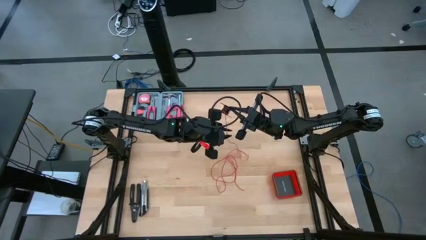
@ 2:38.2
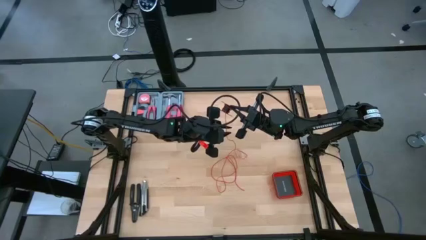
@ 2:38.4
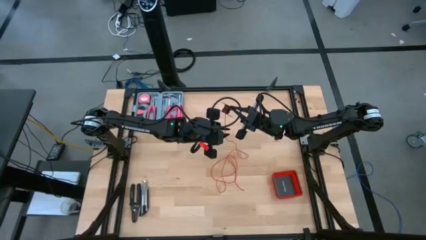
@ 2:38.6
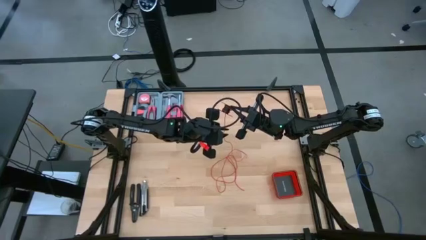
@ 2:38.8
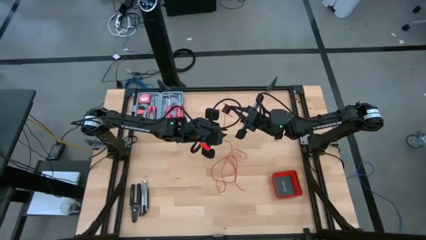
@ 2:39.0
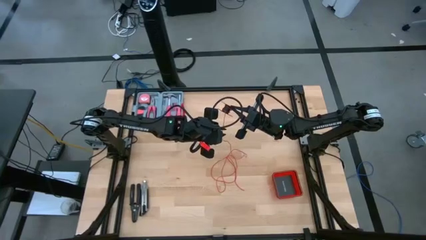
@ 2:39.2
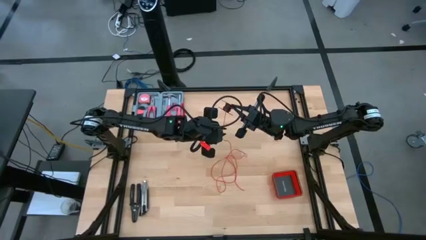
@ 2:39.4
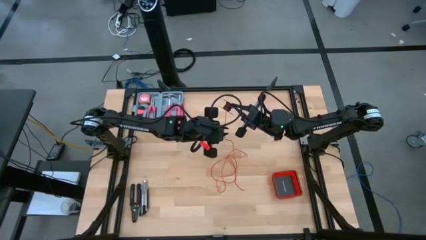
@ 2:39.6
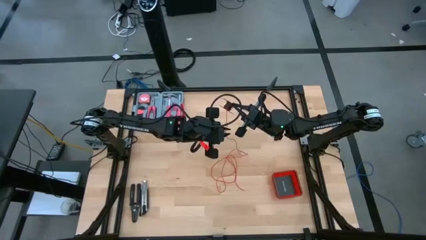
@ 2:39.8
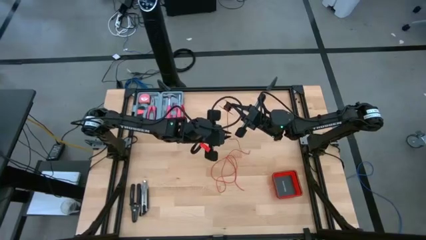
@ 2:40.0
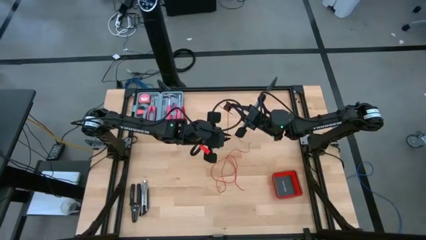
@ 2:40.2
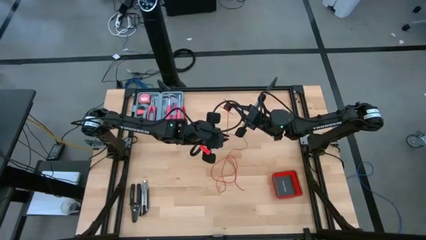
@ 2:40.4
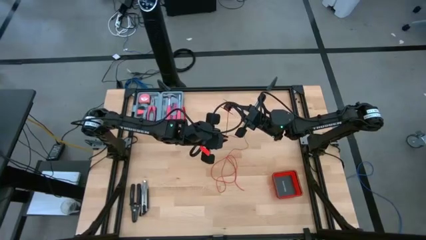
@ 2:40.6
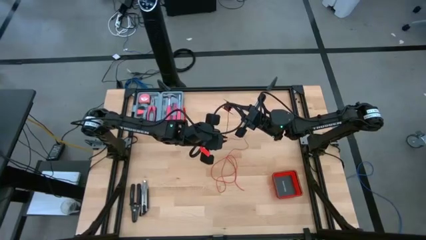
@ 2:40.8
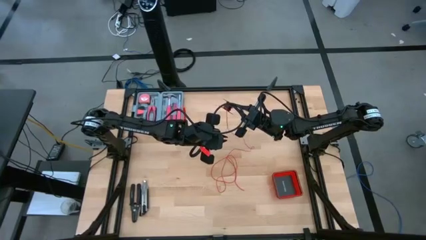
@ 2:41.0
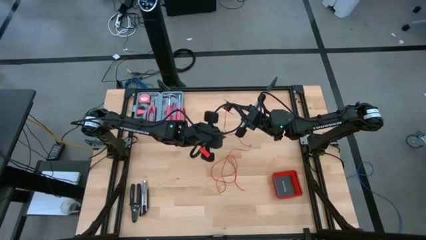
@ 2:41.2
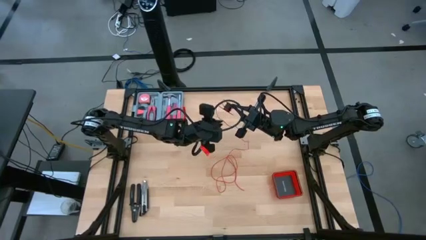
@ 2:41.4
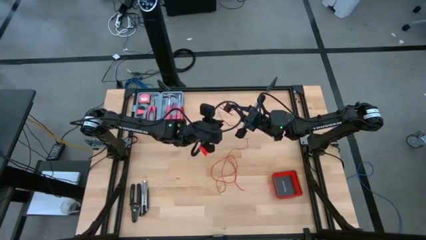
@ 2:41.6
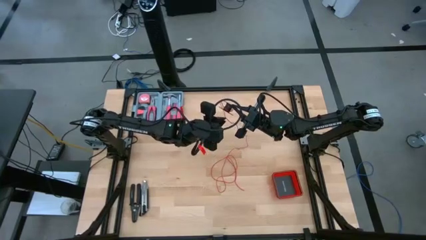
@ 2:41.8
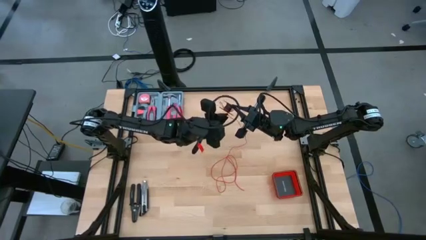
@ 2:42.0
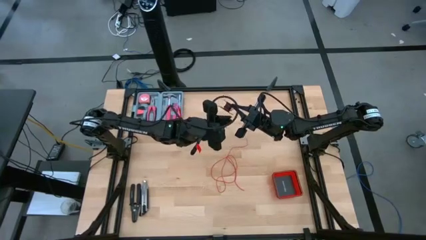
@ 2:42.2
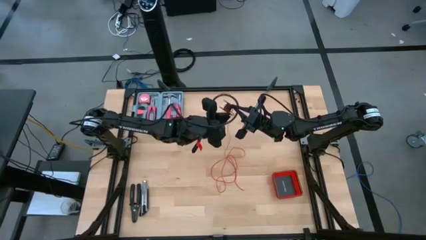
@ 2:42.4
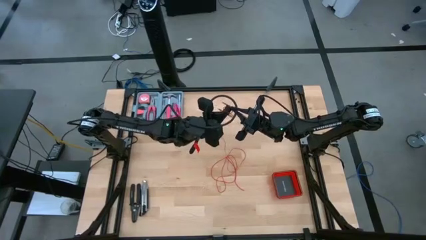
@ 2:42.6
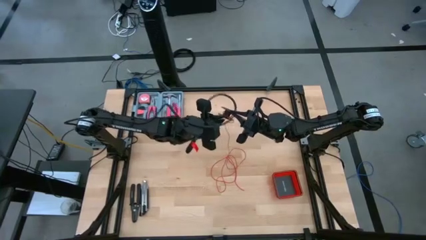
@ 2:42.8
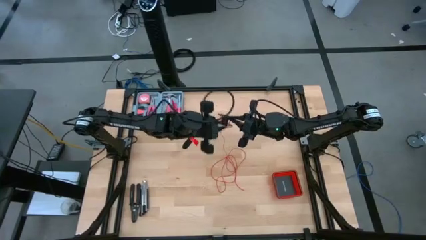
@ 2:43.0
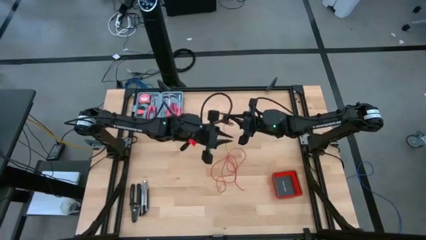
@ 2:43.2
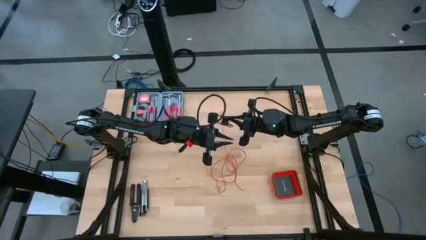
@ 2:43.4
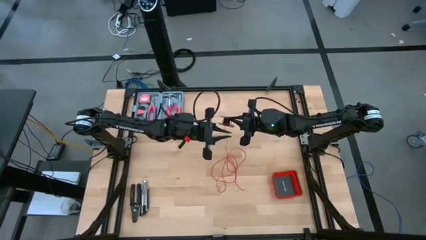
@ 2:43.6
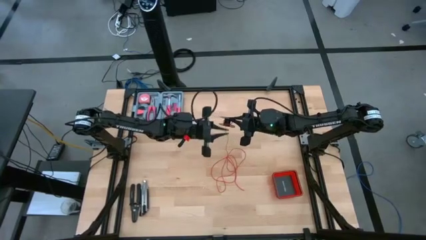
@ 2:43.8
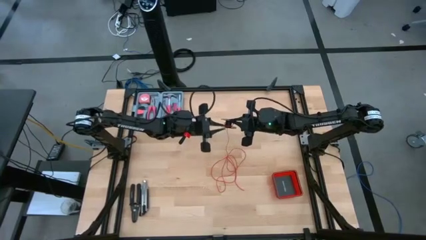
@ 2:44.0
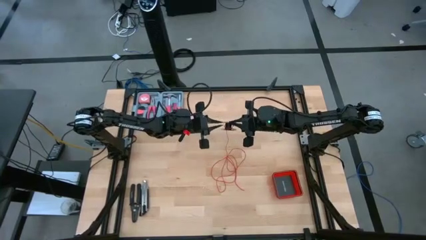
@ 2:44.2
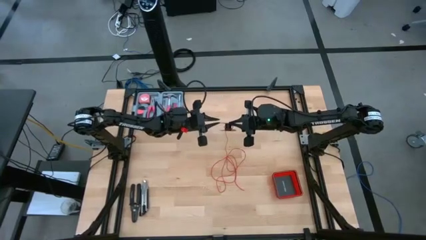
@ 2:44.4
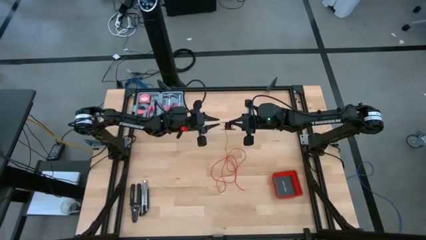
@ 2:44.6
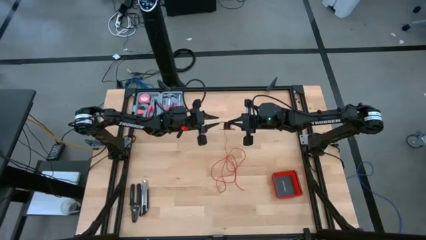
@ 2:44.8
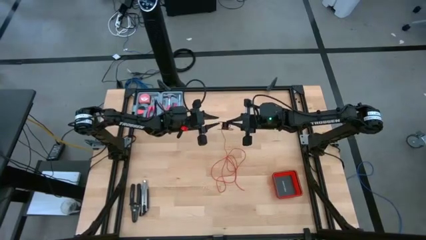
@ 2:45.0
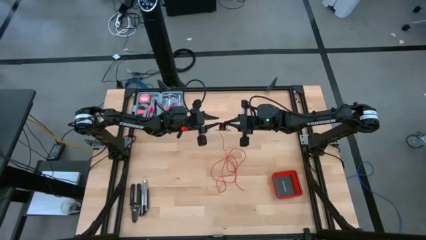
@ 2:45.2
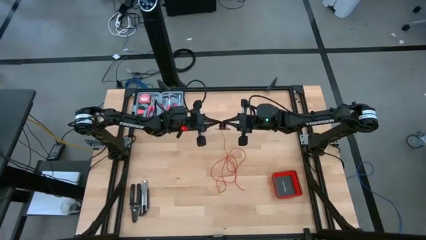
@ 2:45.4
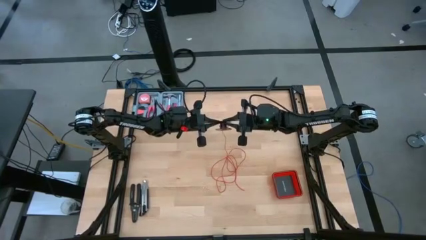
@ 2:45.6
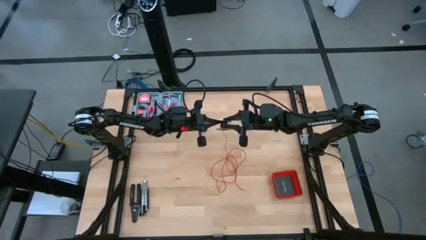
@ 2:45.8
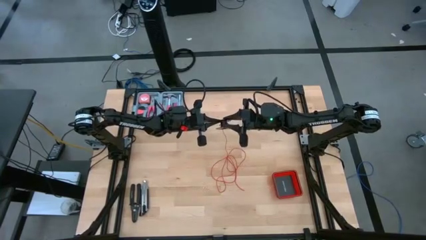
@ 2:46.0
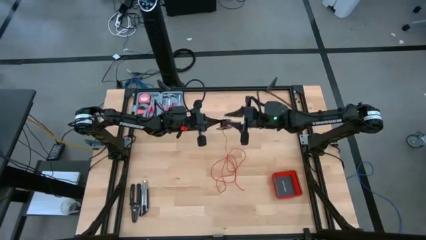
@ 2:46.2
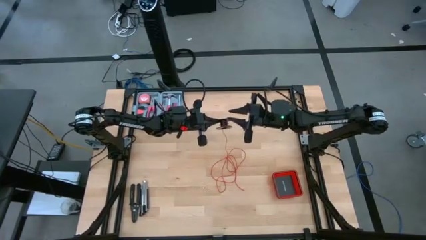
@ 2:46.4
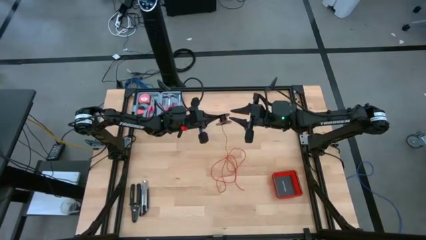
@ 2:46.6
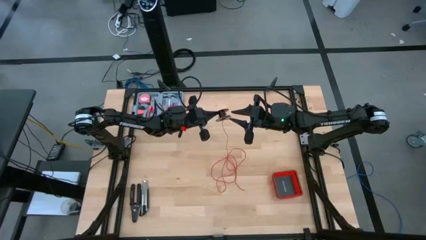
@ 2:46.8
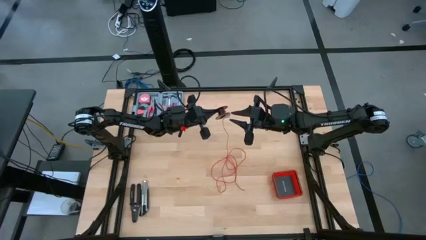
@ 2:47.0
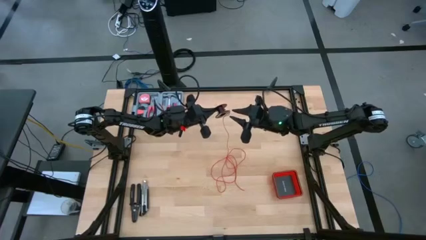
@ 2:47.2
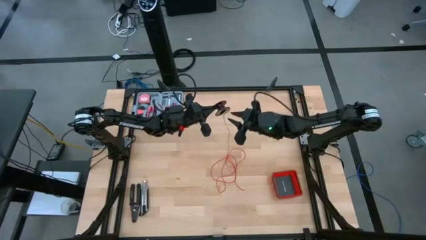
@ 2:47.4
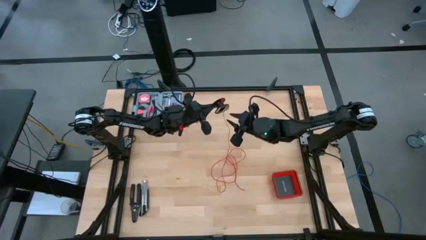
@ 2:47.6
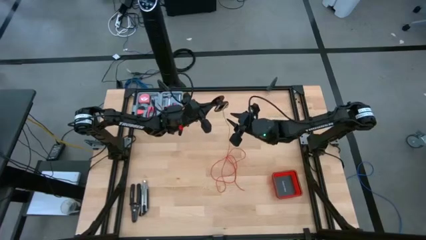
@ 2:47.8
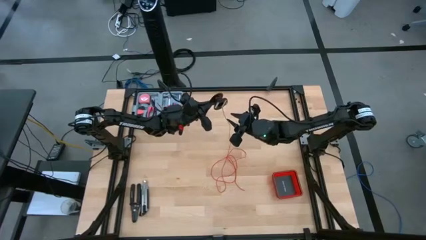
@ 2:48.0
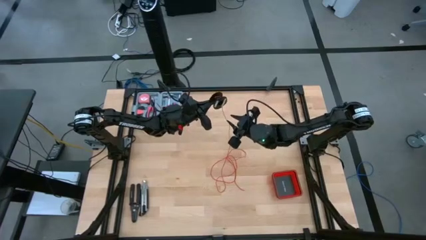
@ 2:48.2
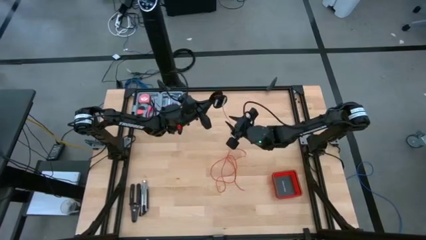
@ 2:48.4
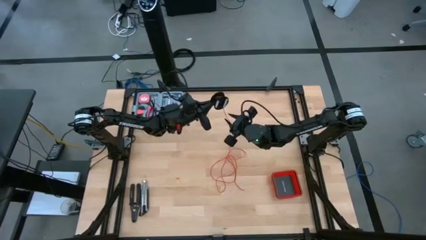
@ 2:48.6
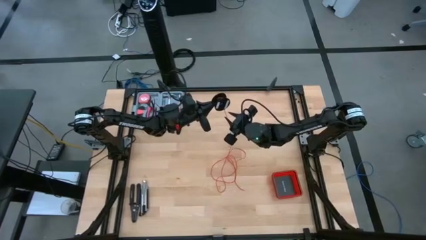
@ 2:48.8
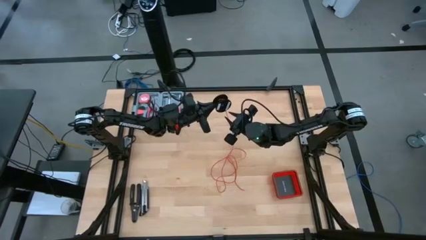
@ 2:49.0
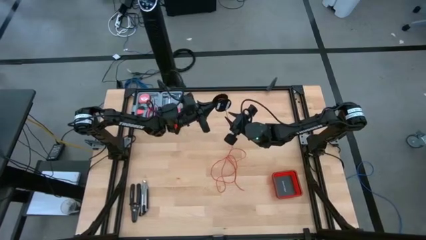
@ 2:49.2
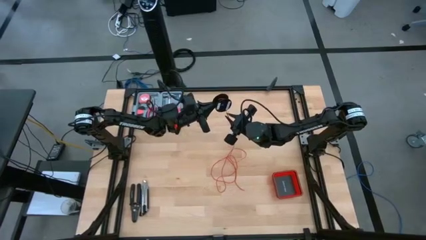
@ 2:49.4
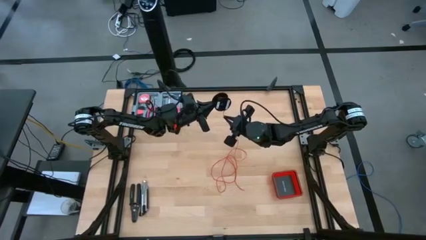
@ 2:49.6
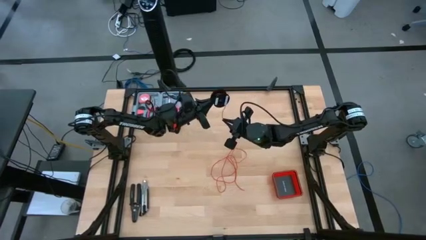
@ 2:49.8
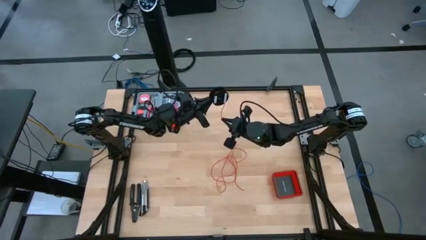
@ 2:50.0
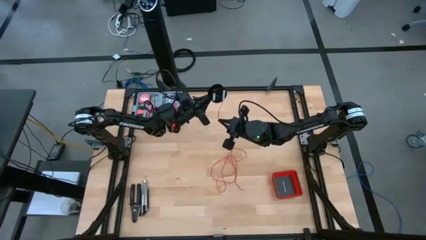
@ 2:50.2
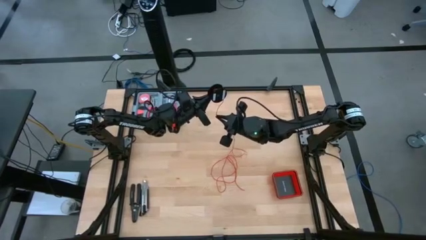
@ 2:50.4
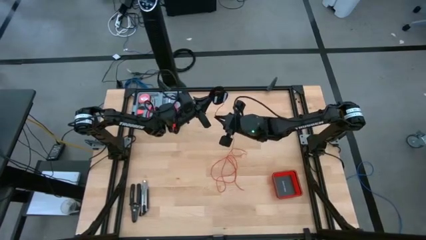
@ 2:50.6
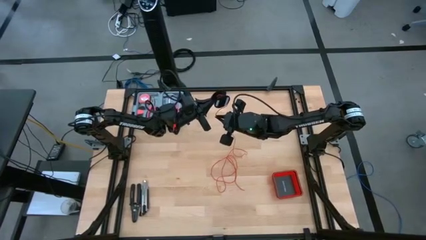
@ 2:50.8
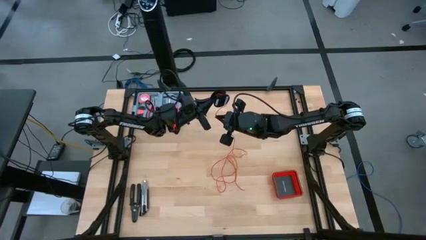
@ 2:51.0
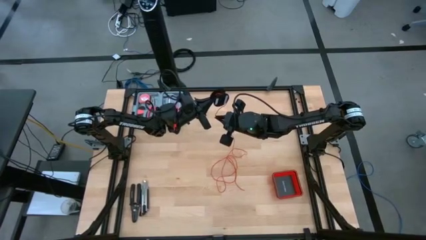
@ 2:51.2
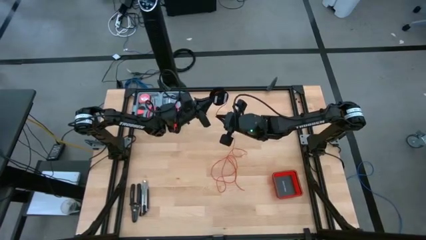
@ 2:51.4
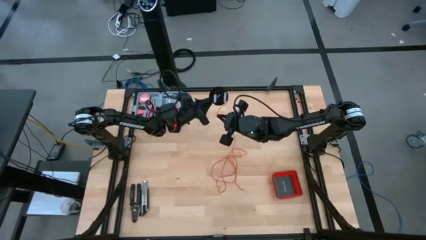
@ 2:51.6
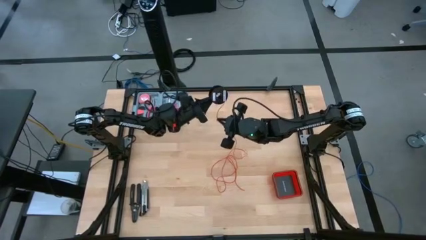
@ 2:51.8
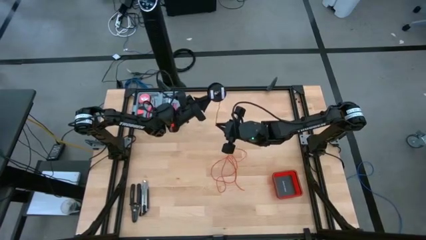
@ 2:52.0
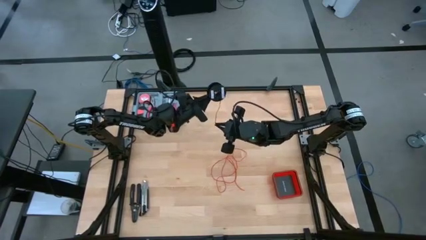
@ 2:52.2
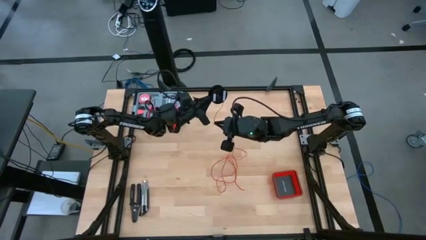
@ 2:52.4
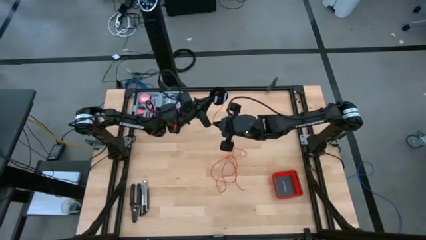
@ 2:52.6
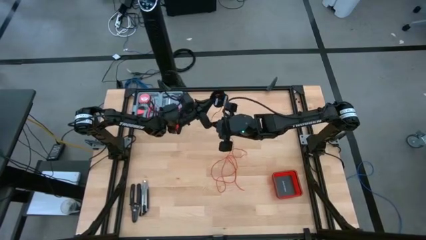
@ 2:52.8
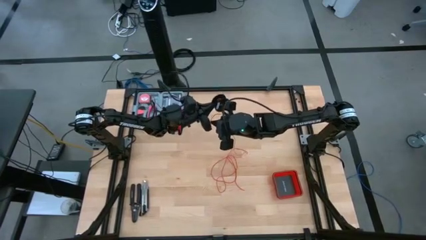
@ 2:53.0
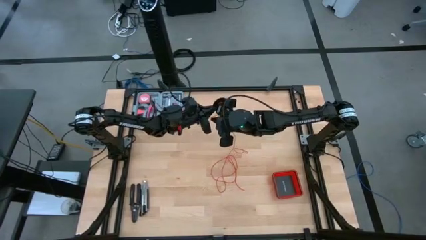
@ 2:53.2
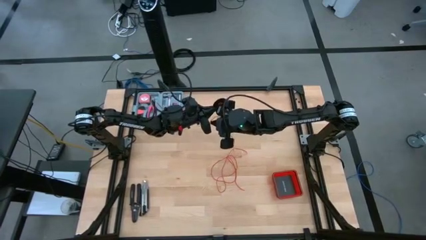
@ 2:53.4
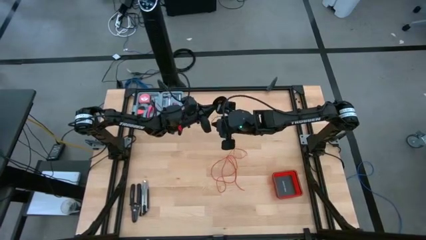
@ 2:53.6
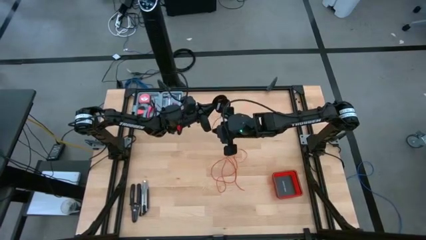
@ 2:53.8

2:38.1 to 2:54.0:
Task: Coil cords
Coil the red wire onto the spool
